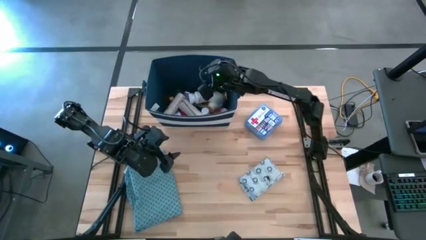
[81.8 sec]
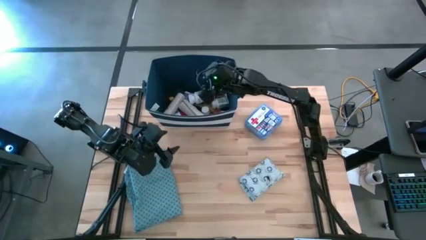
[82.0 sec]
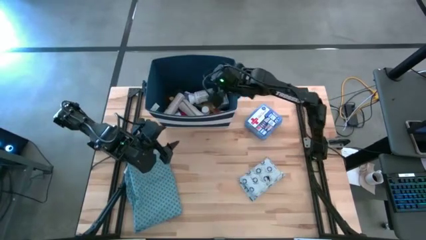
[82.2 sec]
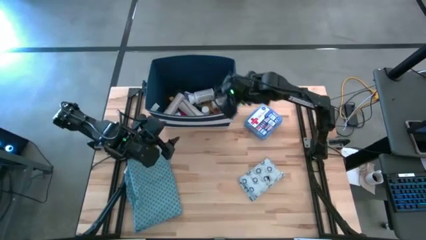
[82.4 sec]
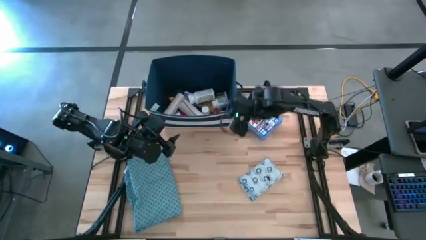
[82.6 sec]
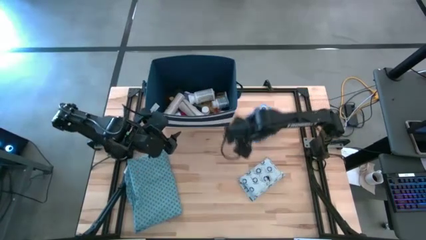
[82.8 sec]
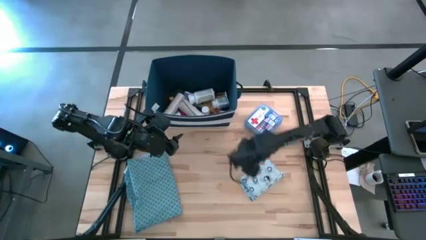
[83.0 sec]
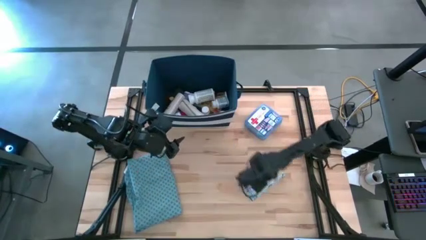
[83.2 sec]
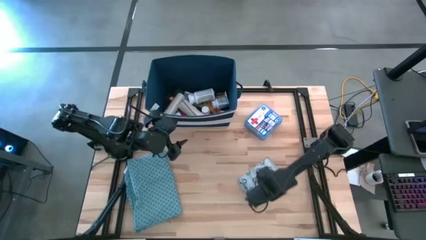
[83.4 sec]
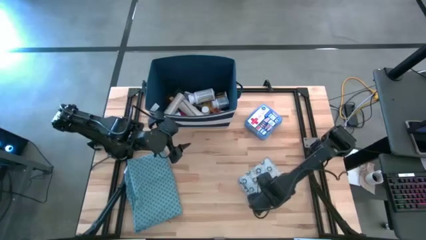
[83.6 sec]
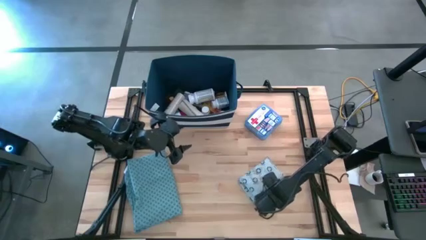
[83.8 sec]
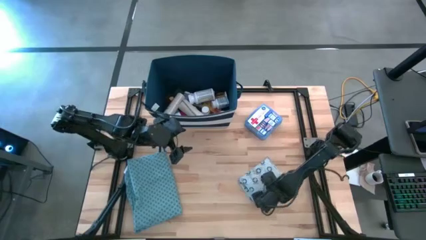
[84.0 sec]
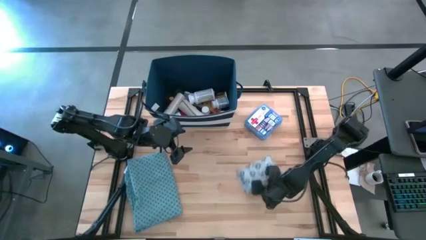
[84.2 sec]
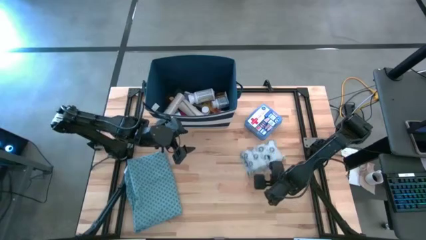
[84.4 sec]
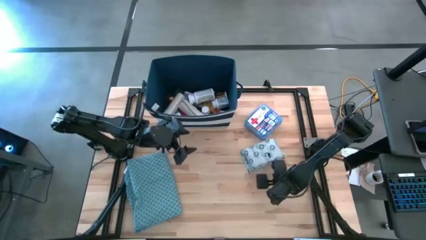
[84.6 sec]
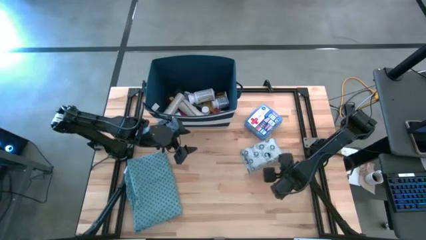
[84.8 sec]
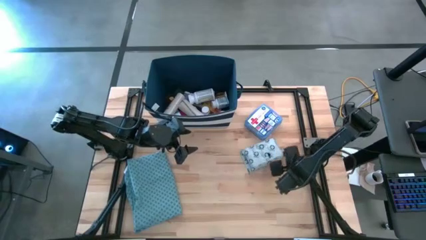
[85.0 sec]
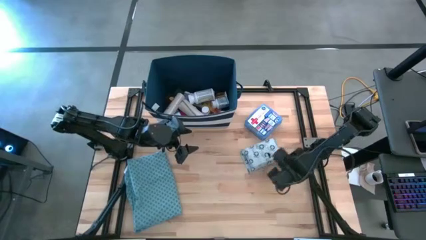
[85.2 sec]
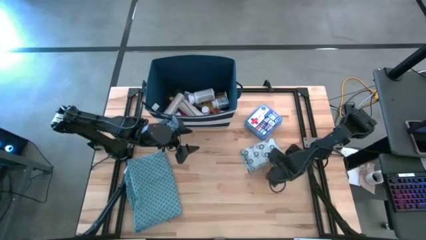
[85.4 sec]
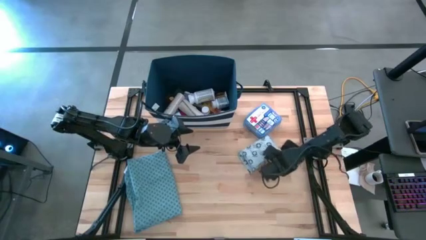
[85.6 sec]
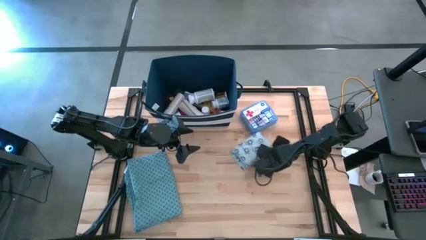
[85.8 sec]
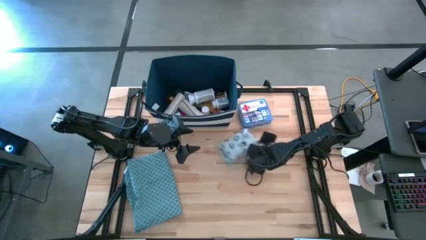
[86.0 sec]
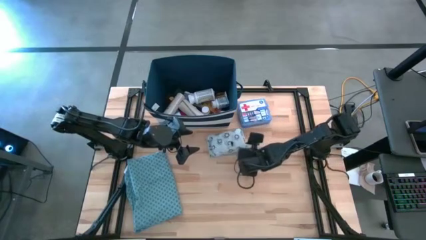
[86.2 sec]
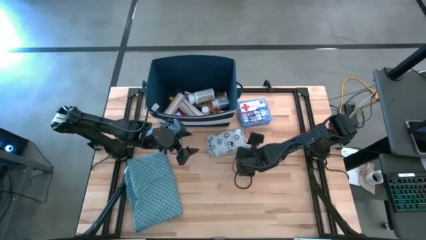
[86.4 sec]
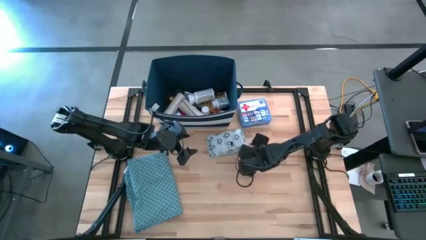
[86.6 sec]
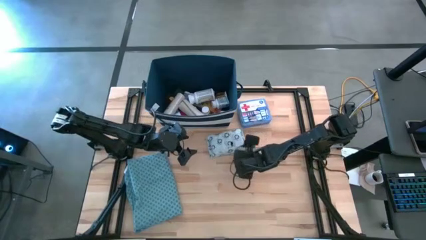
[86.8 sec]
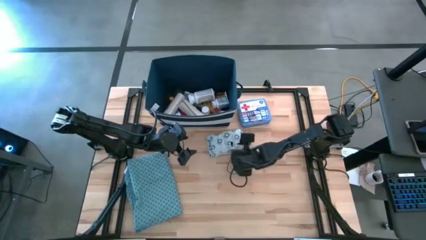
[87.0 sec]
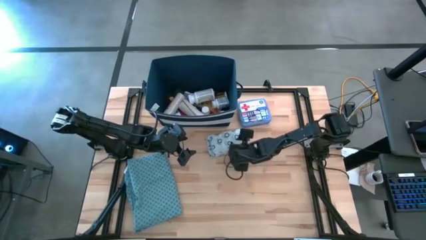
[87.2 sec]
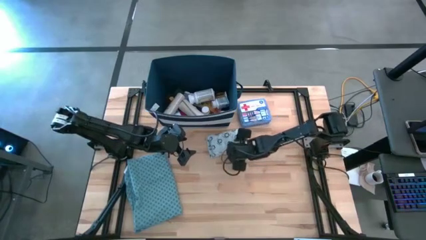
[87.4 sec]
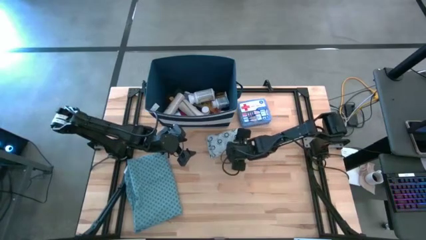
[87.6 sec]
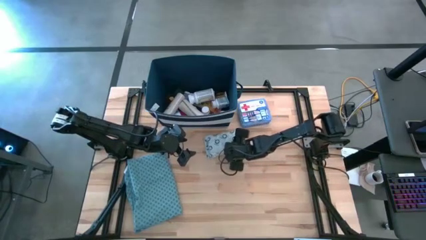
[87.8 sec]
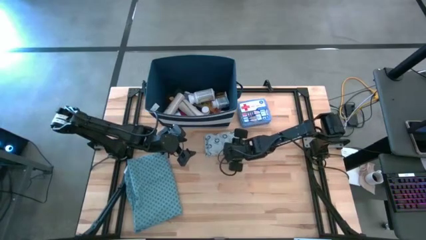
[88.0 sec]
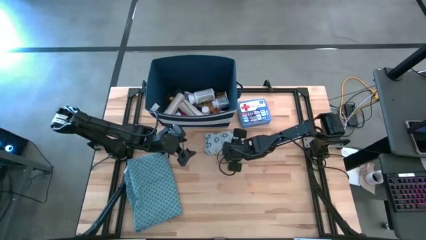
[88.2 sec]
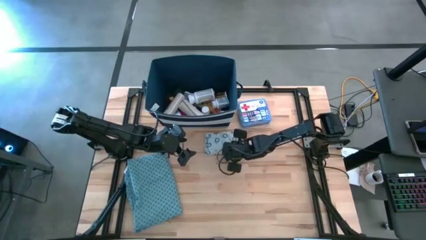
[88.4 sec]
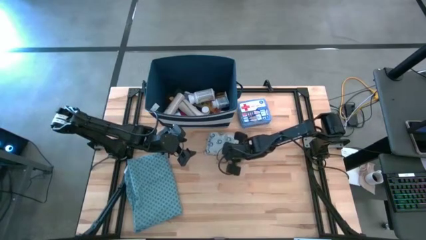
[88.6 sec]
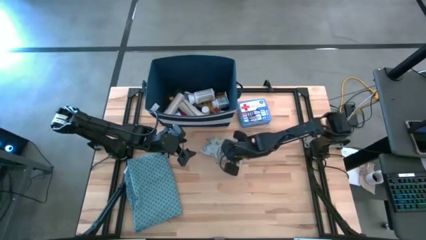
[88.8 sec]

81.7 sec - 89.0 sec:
Task: Pick & place medical supplies in basket/bin
Put the white mailer bag into the blue bin

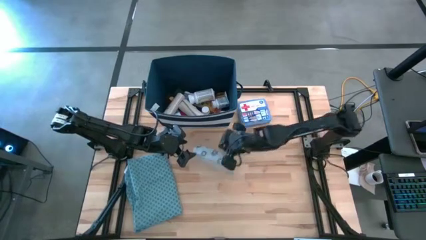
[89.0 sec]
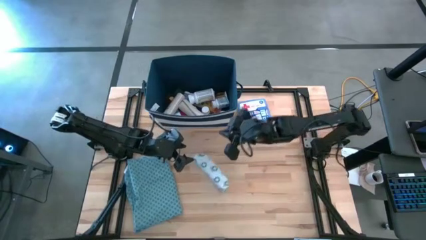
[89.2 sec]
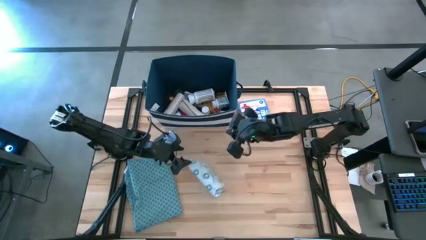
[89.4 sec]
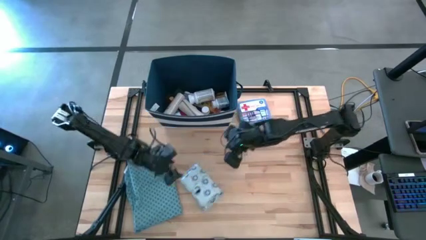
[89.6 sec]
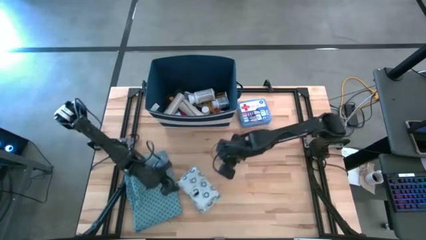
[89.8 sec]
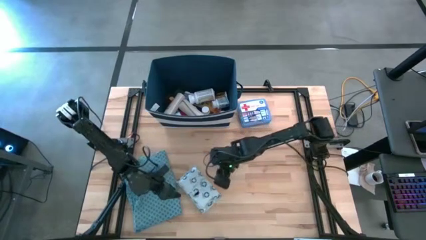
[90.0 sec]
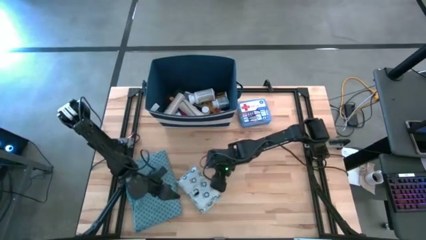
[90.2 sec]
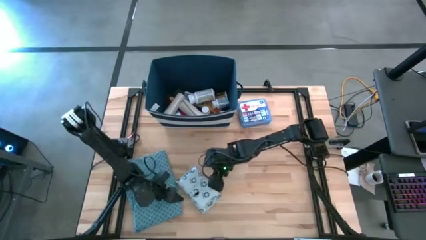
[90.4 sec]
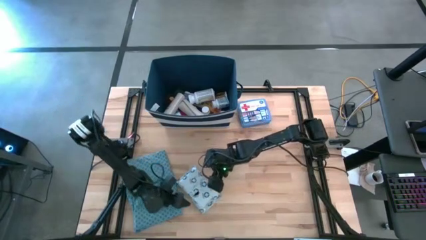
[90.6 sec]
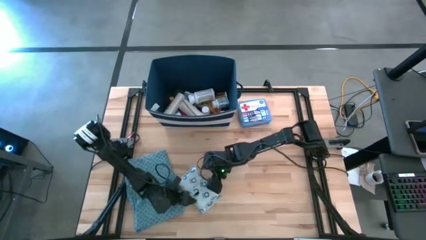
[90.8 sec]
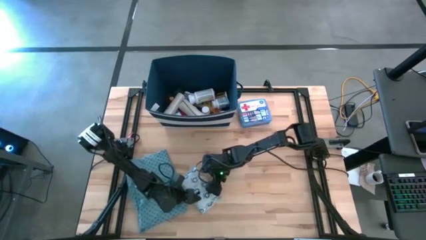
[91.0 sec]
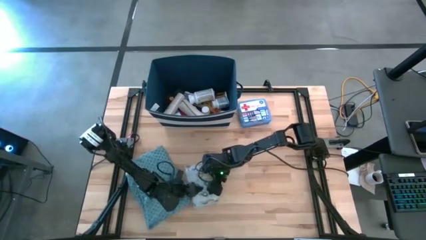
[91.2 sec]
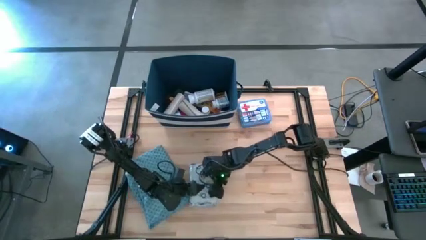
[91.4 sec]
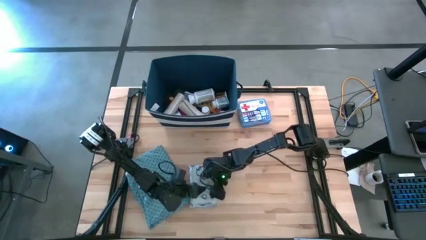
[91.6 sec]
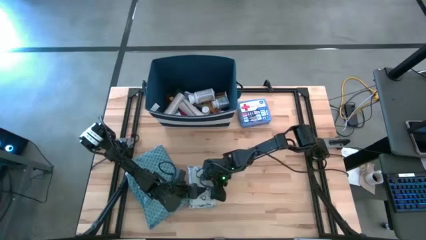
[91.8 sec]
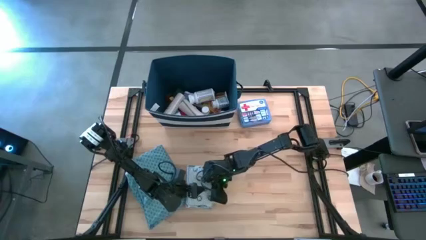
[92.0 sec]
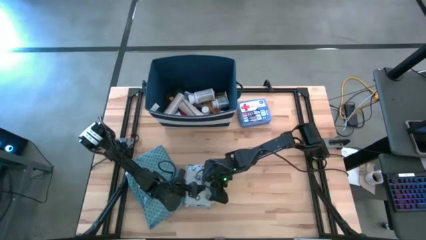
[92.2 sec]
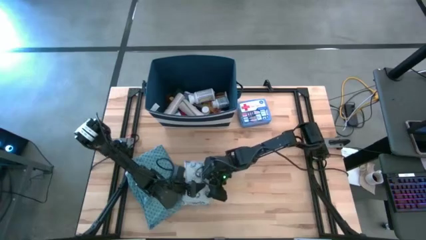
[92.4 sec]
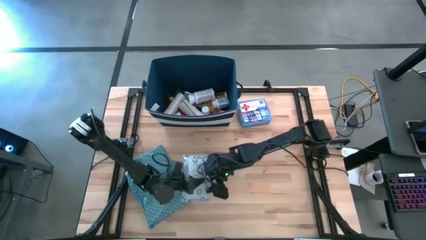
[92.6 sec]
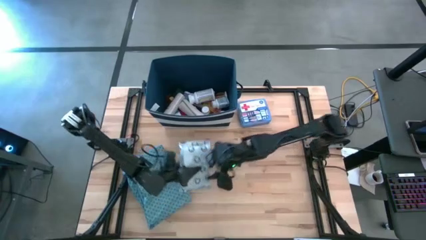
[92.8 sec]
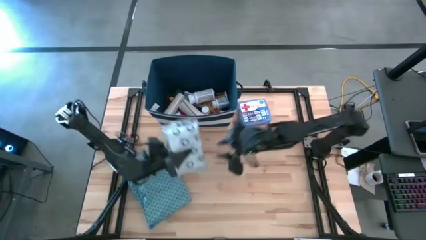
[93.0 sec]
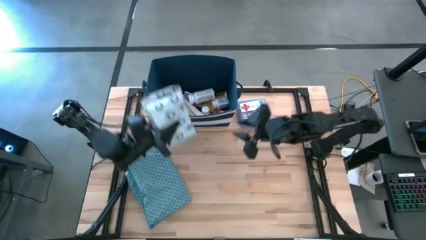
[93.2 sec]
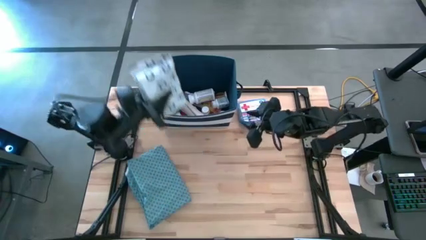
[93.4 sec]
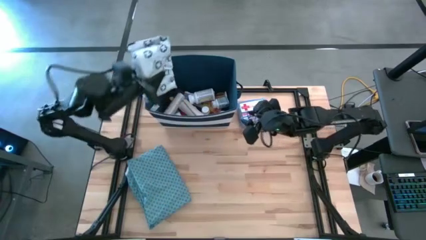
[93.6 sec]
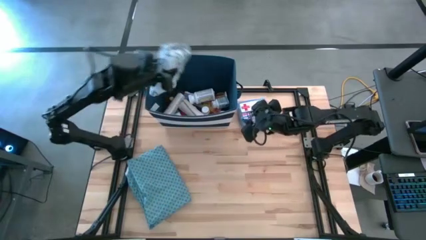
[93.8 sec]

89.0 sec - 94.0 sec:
Put the white mailer bag into the blue bin

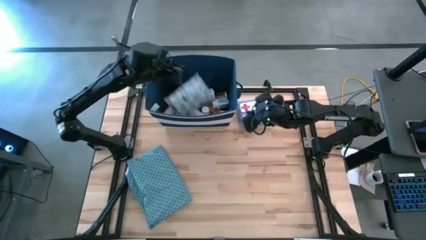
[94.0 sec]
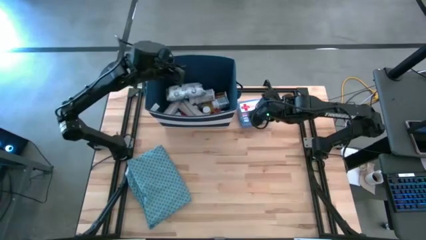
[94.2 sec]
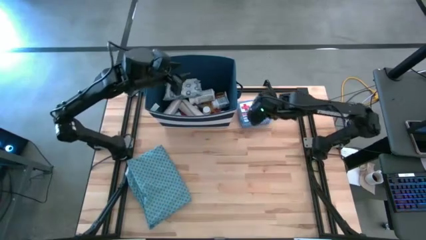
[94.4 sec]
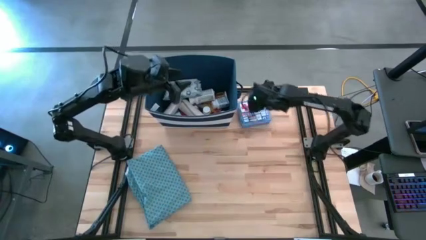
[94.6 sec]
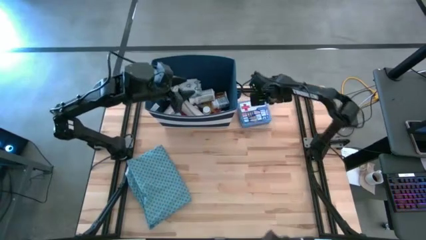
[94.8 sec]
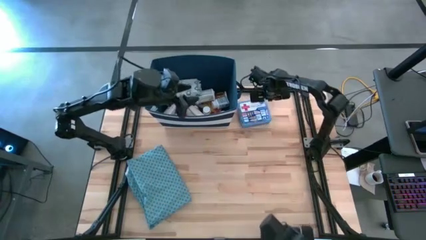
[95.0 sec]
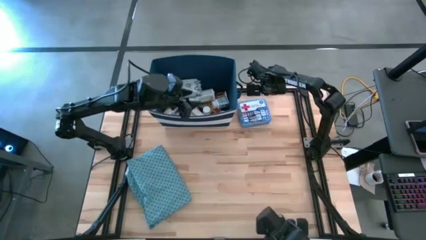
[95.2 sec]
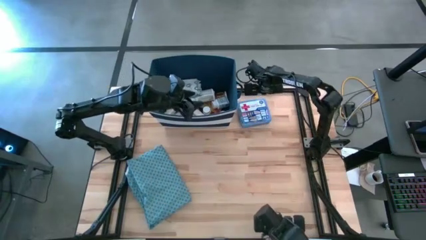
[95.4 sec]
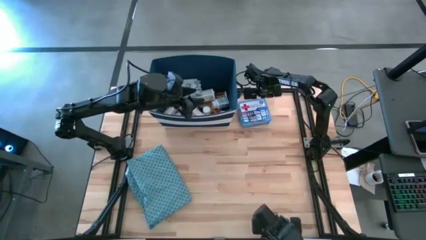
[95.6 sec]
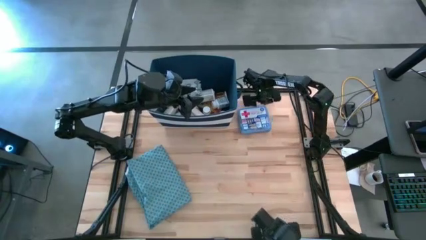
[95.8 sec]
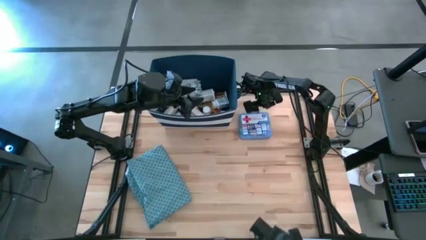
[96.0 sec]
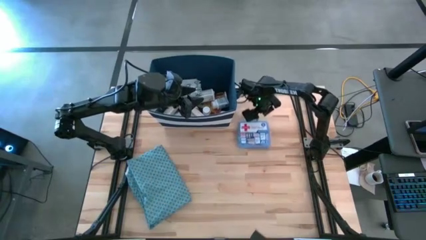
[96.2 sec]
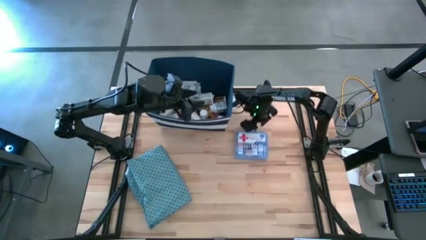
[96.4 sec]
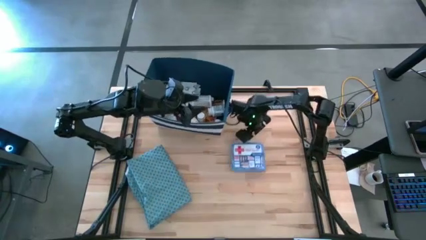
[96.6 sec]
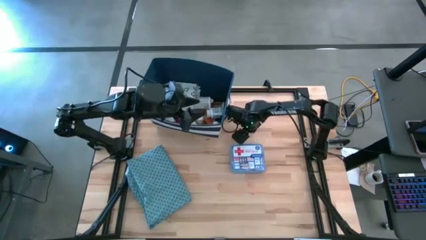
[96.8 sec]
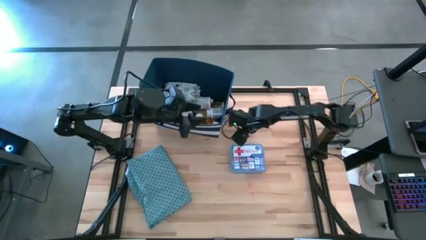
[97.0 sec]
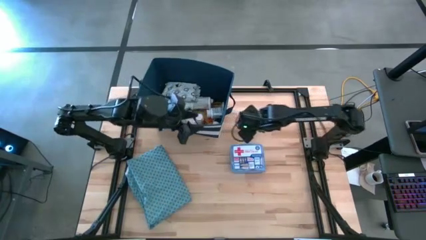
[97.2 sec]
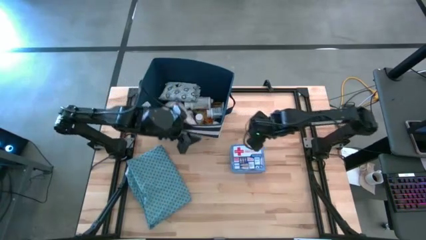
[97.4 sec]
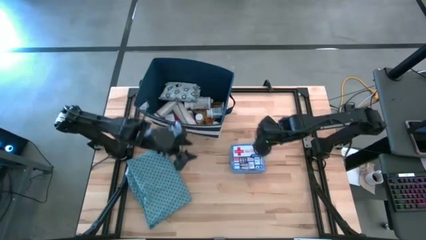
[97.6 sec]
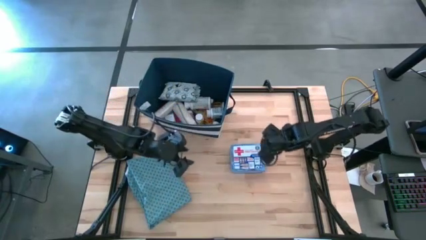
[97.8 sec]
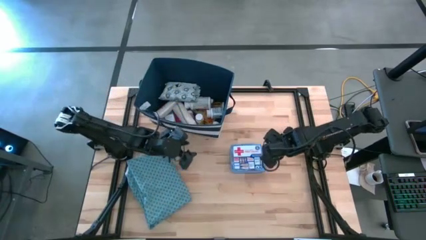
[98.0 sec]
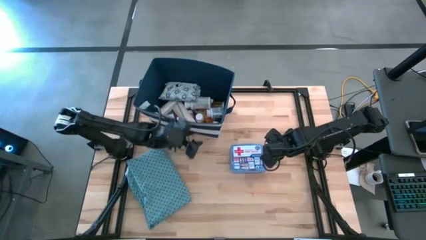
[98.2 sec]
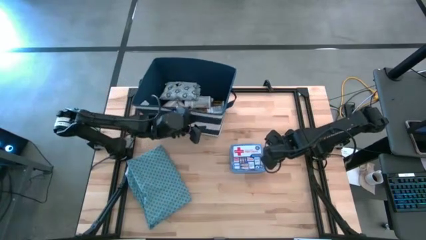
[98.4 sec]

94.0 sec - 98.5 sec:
Adjust the blue bin
